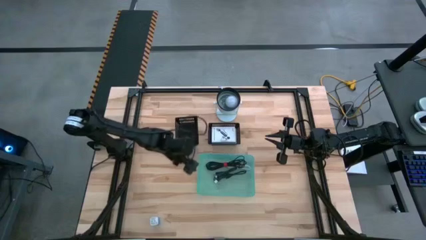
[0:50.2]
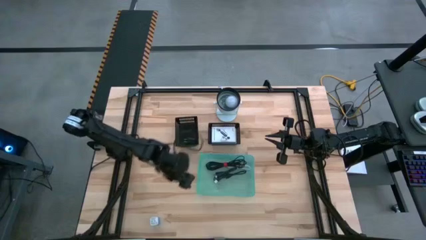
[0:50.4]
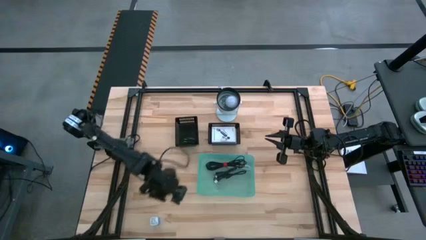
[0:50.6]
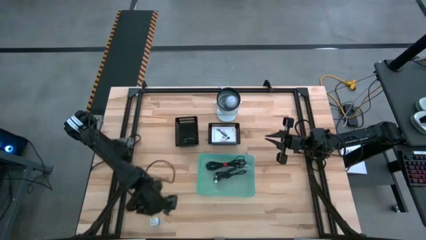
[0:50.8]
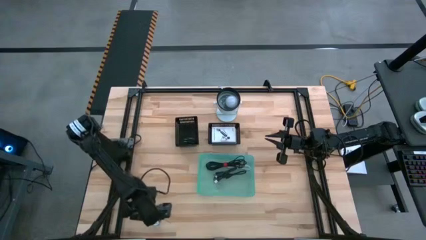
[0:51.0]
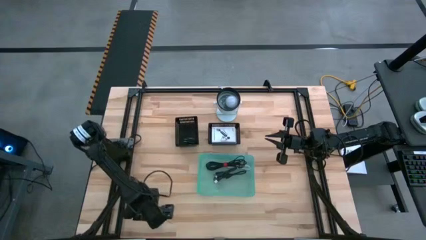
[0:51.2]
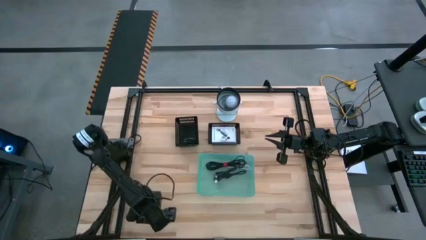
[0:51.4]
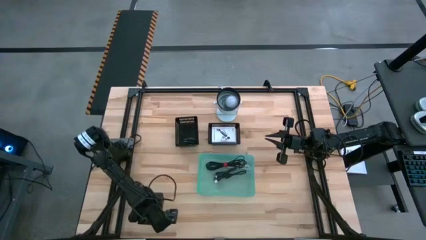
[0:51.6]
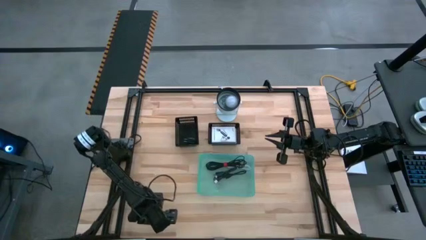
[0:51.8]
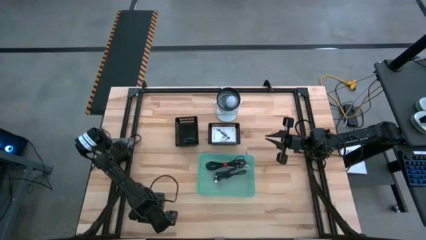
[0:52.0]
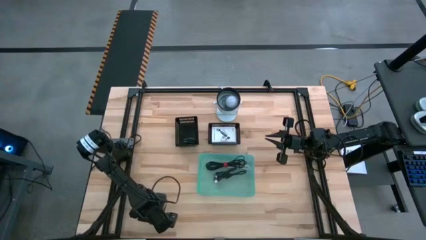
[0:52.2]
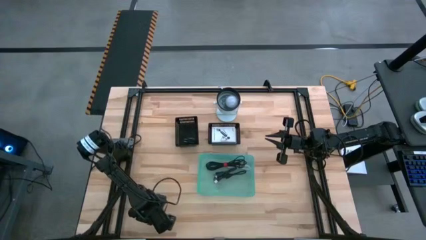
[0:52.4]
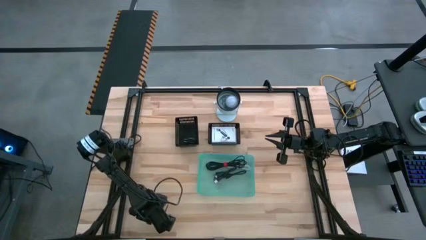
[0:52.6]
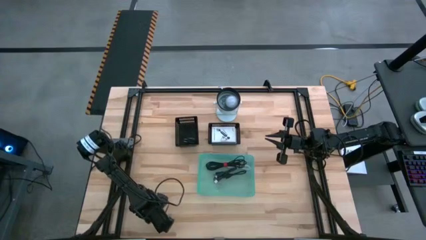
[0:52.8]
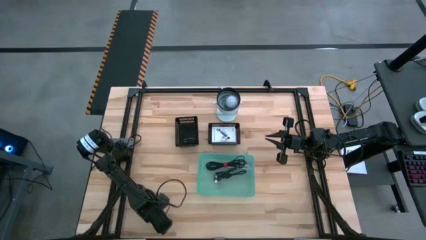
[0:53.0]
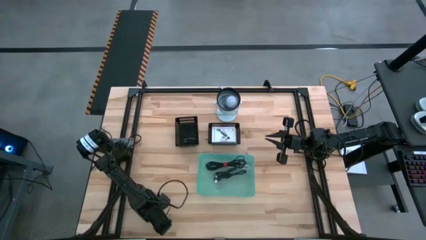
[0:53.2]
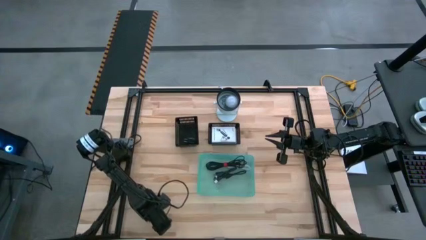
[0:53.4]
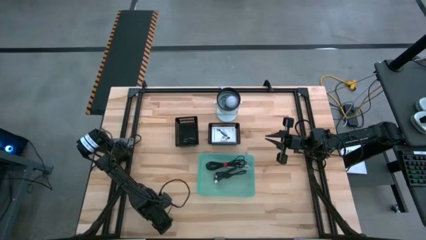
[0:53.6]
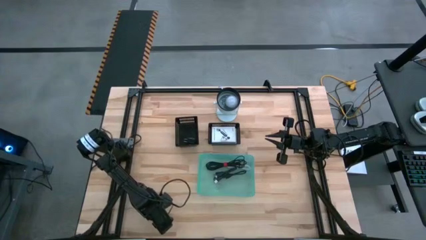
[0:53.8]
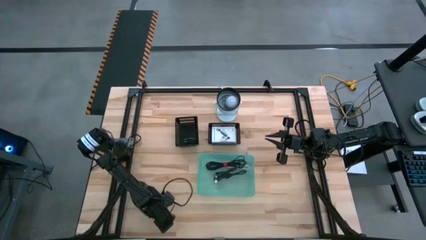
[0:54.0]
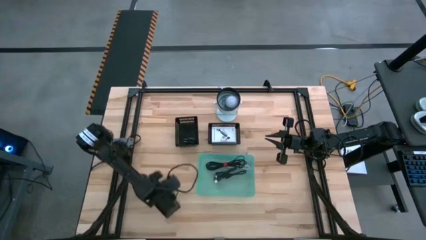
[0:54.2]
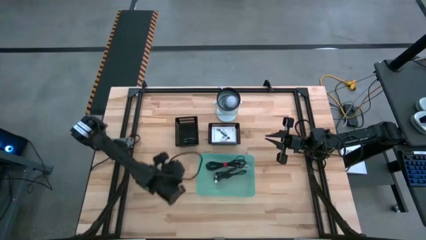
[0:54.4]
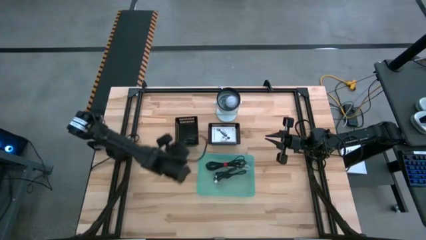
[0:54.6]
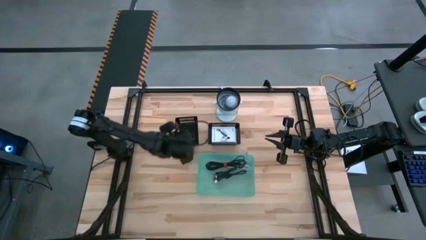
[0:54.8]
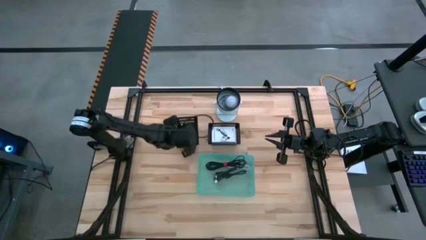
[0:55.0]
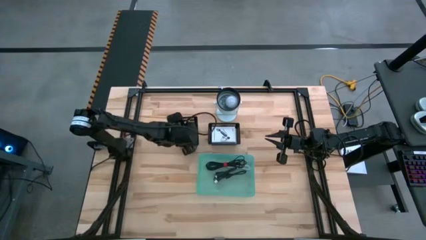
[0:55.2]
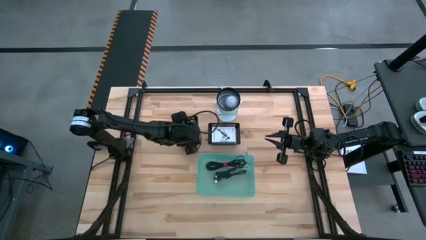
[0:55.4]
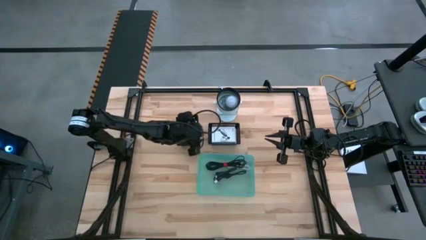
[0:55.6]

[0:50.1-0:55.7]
Task: Pick and place items into bin
Put the blue charger adapter into the left black bin

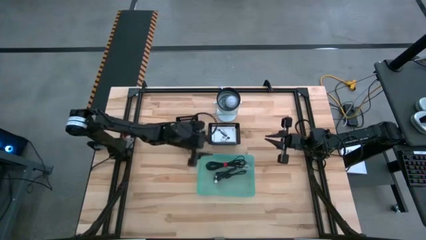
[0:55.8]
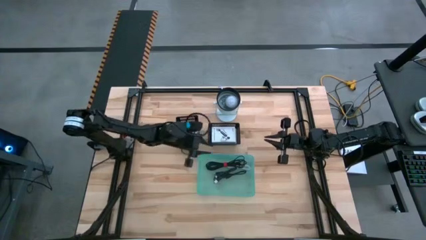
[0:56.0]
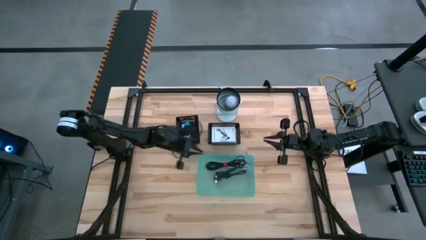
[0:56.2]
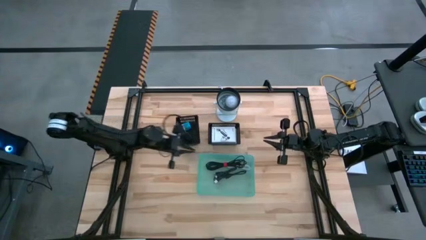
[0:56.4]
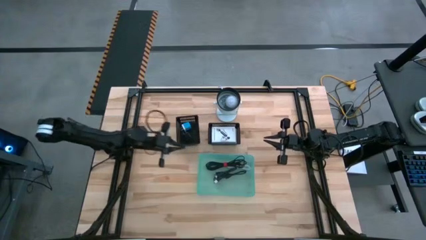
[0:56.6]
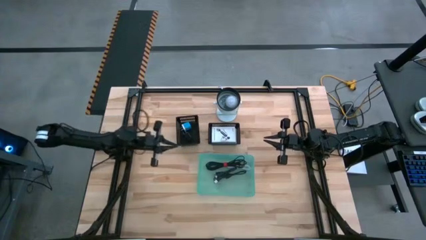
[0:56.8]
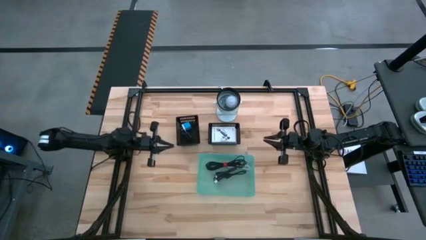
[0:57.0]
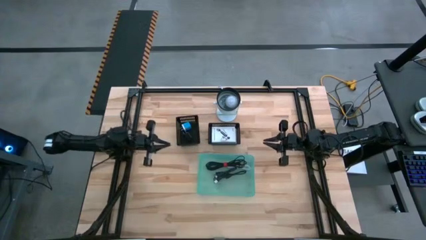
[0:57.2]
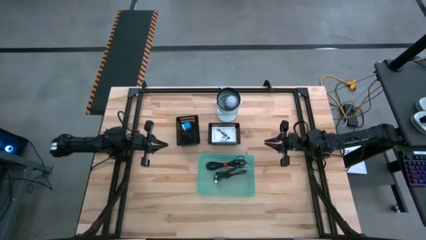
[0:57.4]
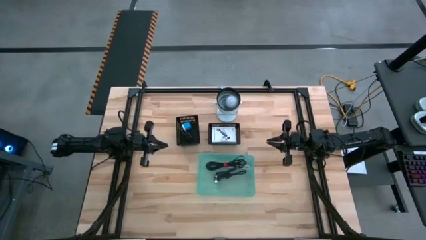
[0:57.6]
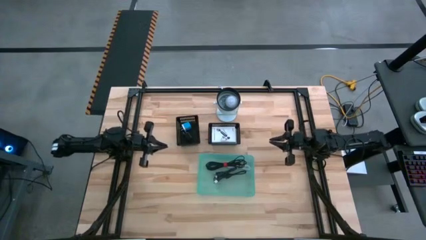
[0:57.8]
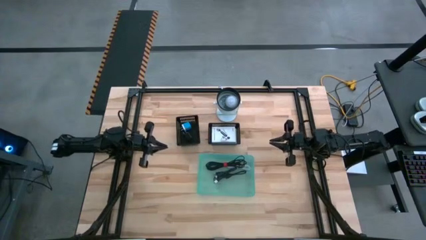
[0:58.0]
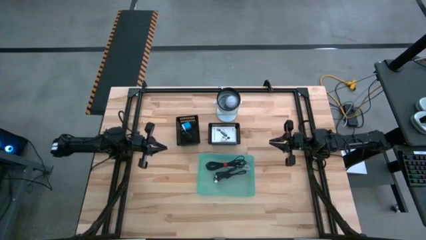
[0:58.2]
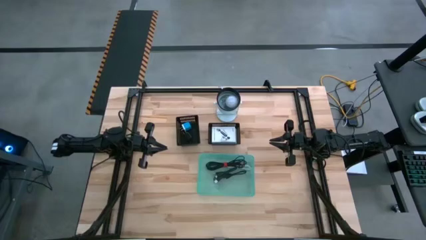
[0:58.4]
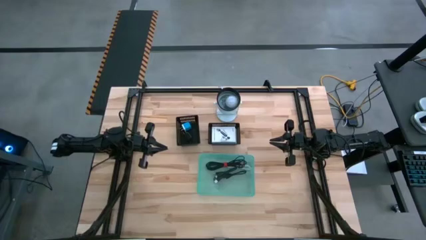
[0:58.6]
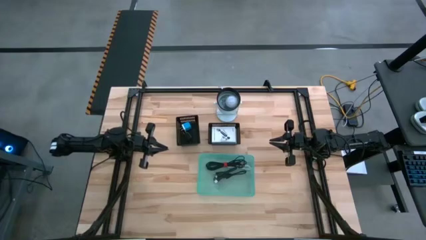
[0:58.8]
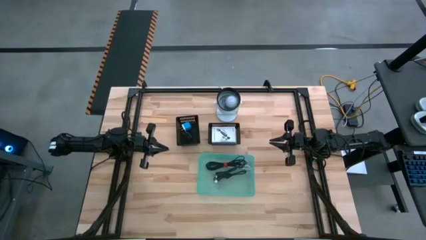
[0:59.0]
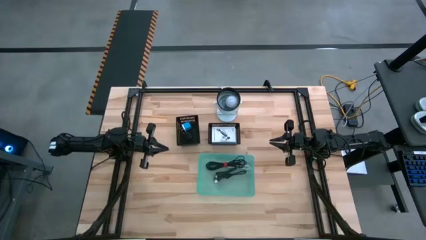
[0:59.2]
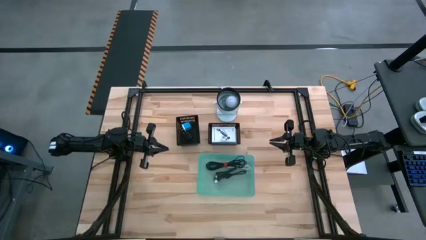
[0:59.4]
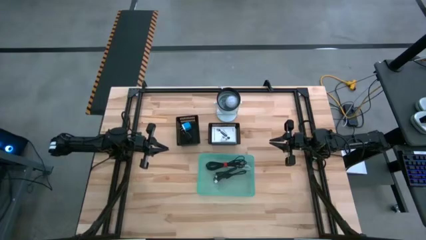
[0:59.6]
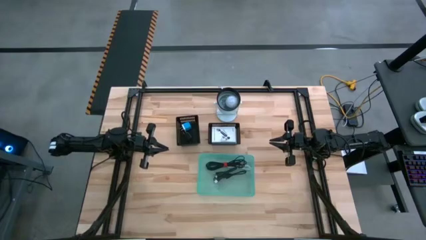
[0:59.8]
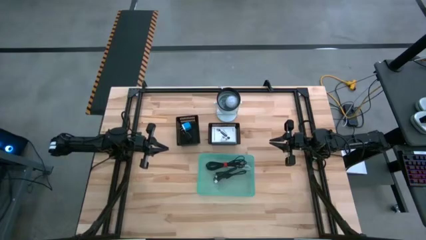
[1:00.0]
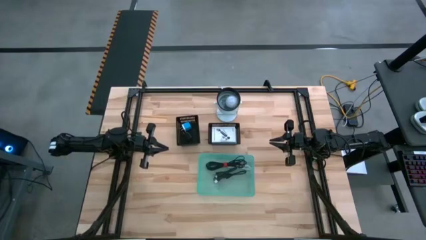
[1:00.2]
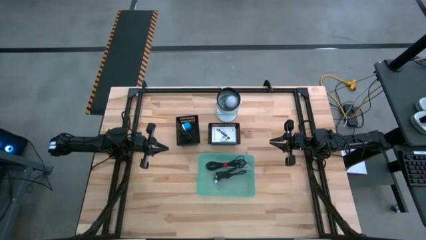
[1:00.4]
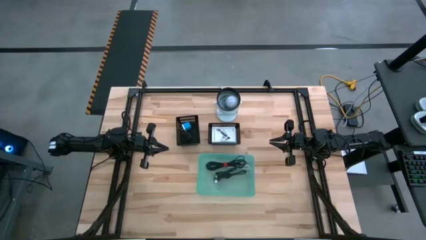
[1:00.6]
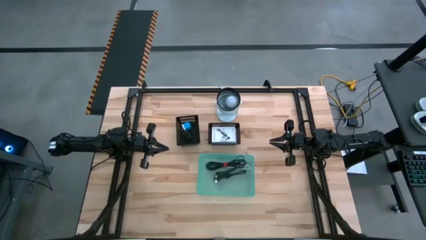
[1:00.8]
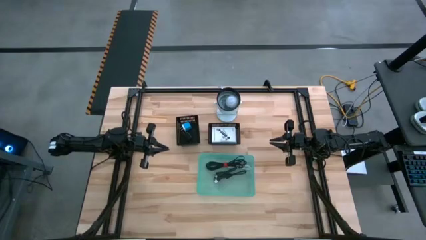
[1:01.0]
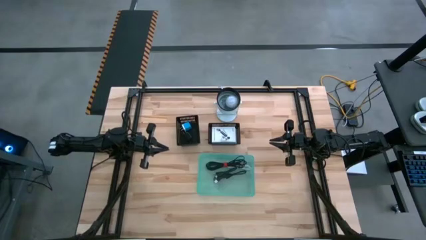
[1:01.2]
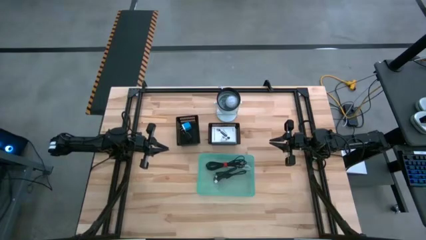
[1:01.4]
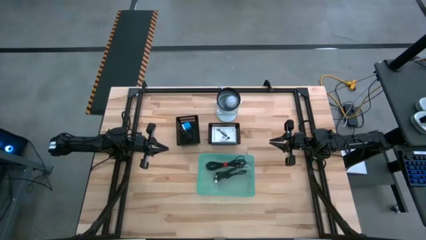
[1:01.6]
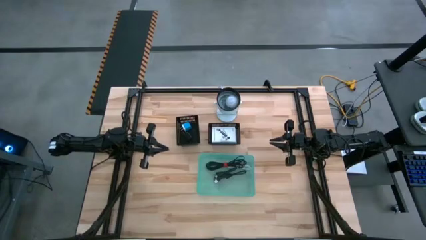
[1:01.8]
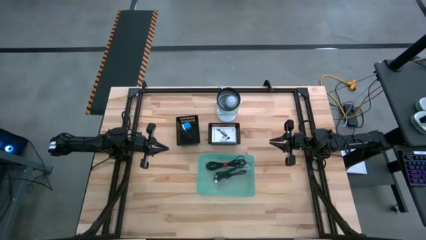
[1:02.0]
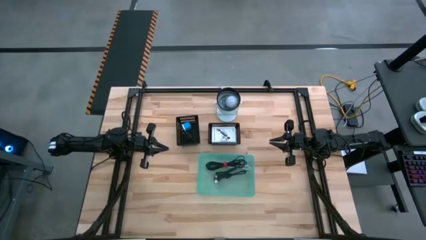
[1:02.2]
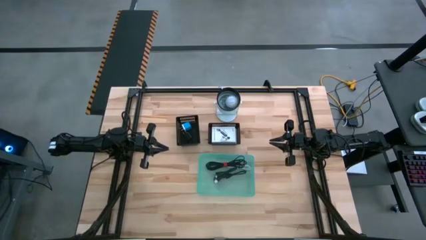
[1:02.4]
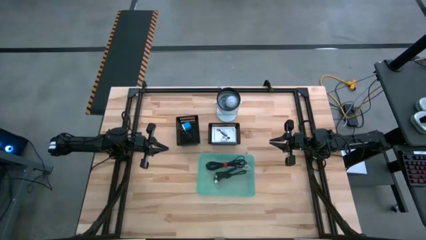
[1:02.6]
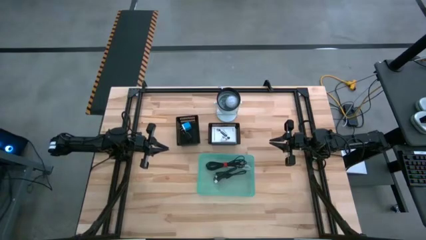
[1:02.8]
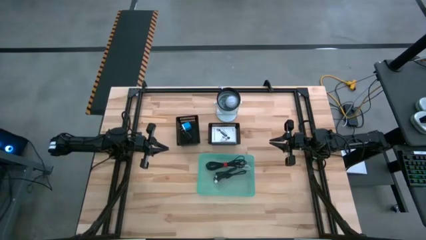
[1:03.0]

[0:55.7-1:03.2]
Return to Home Position
